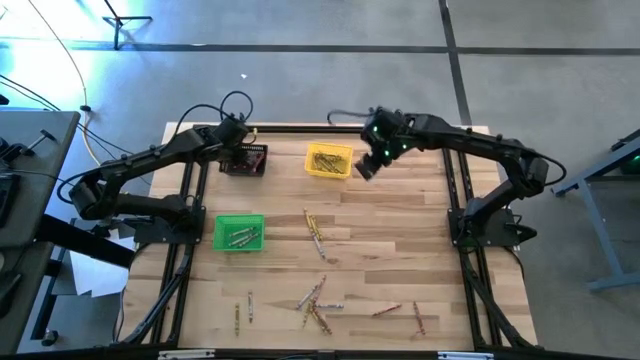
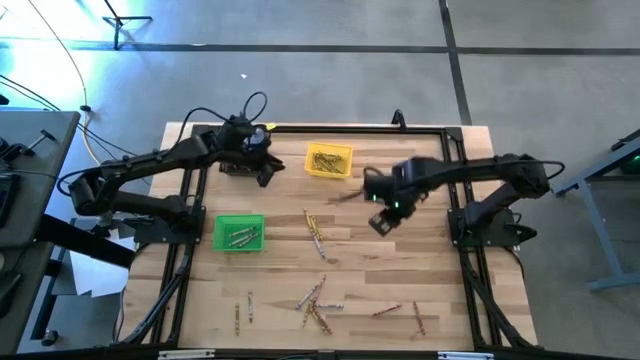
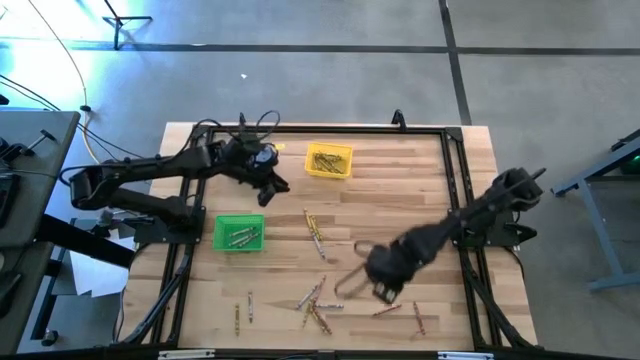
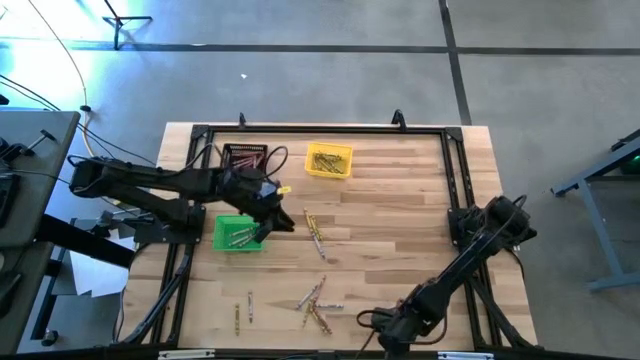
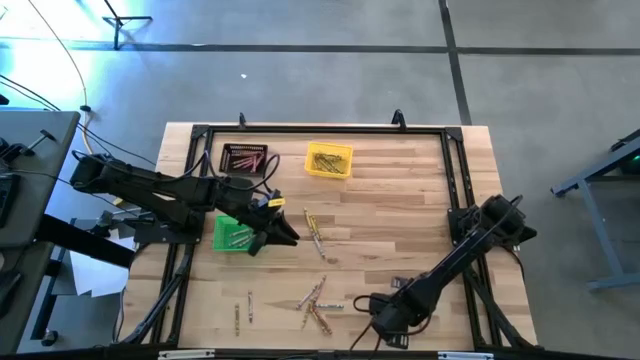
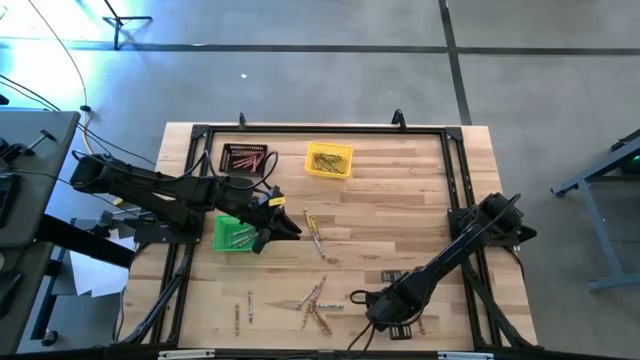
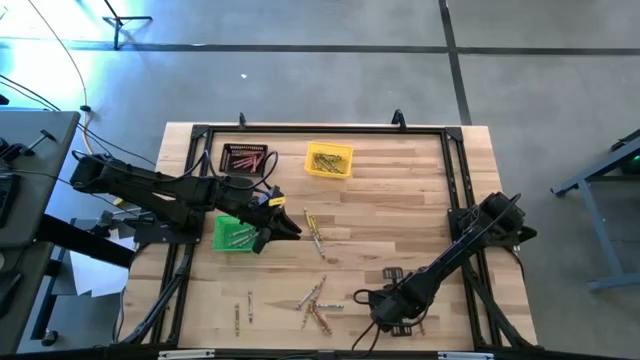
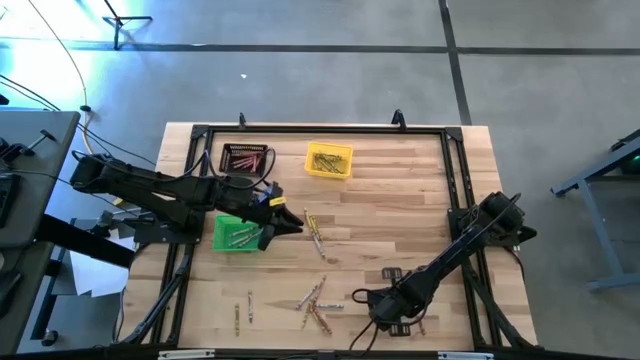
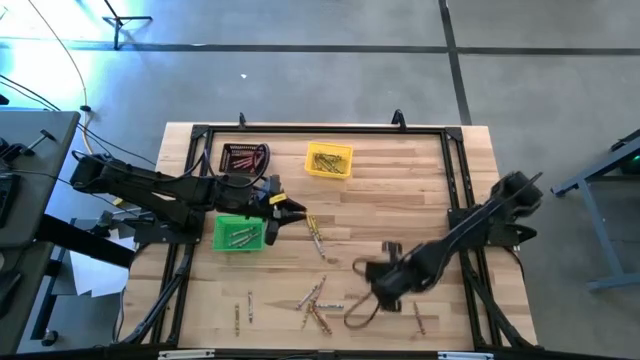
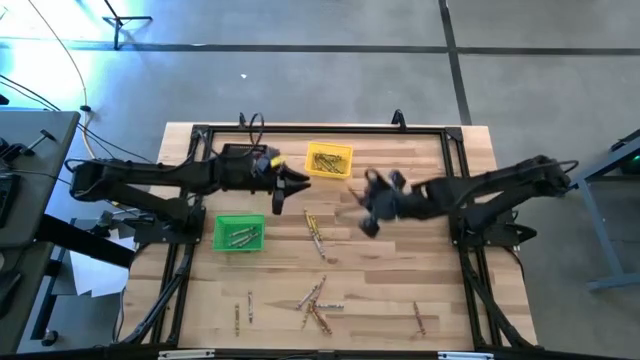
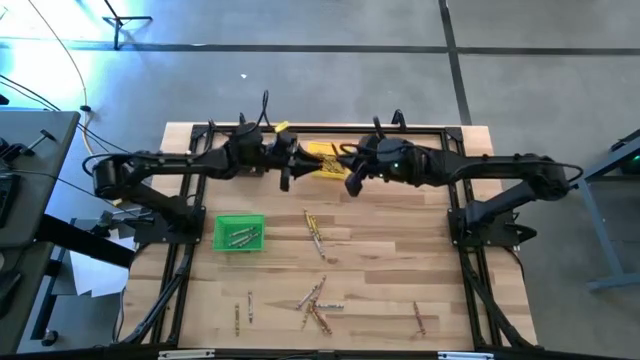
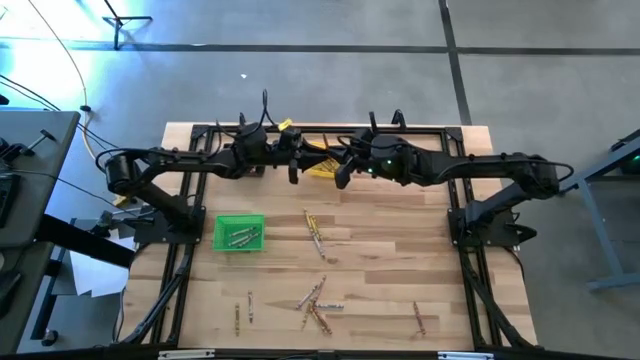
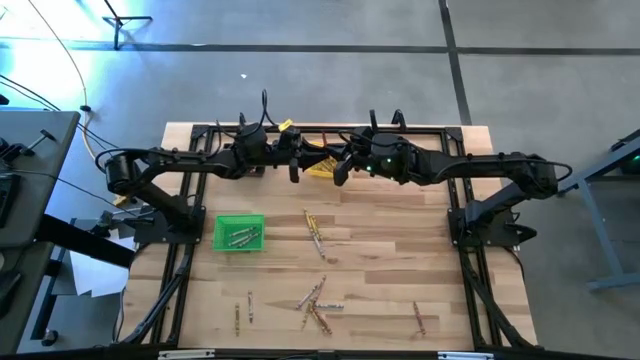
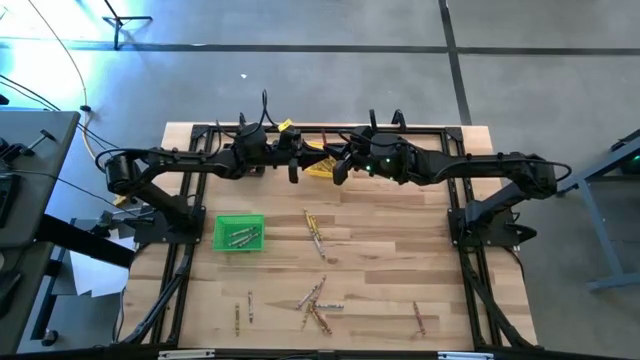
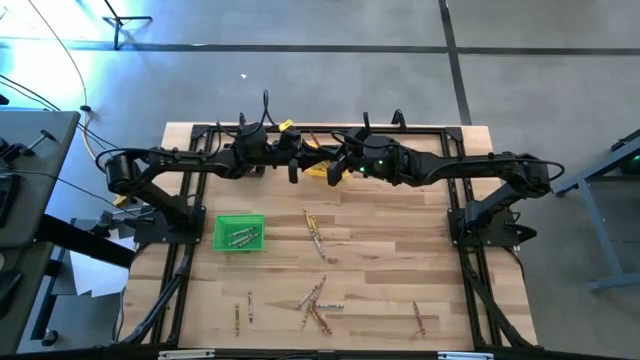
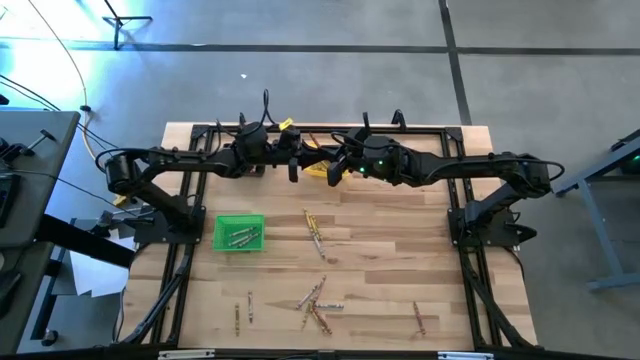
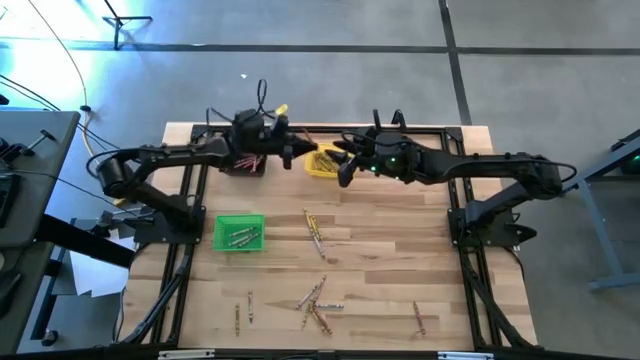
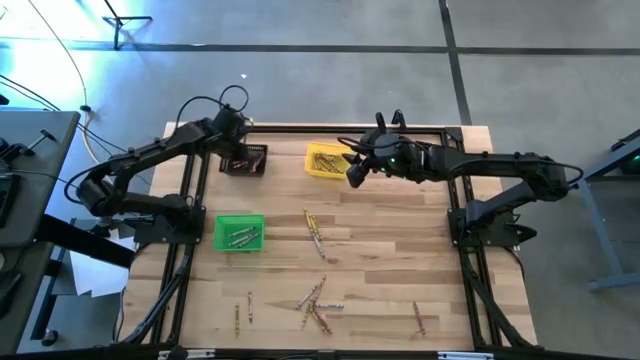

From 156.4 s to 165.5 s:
Task: Sort crayons
Put the red crayon into the black bin

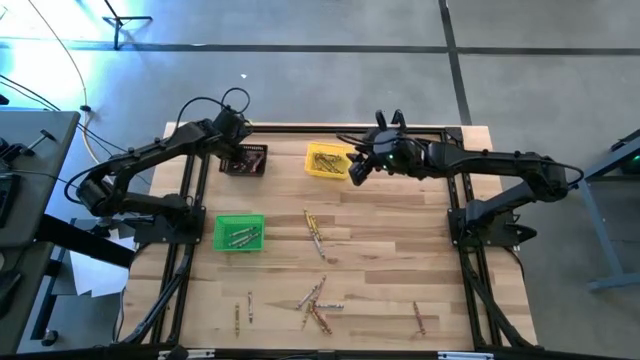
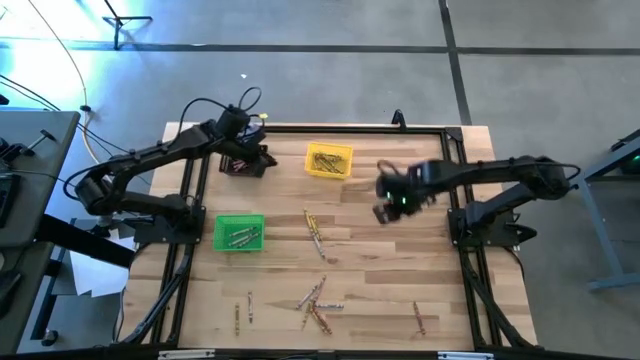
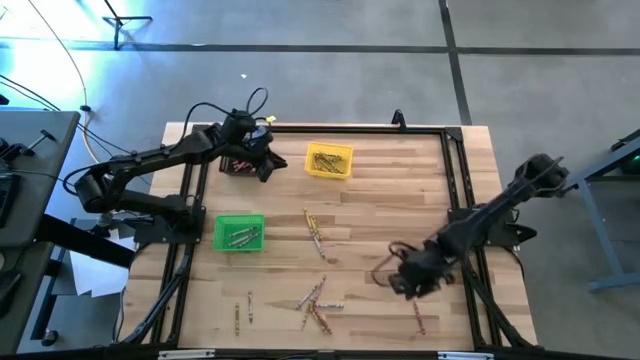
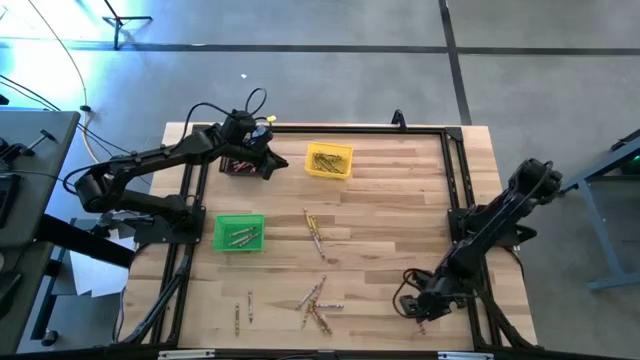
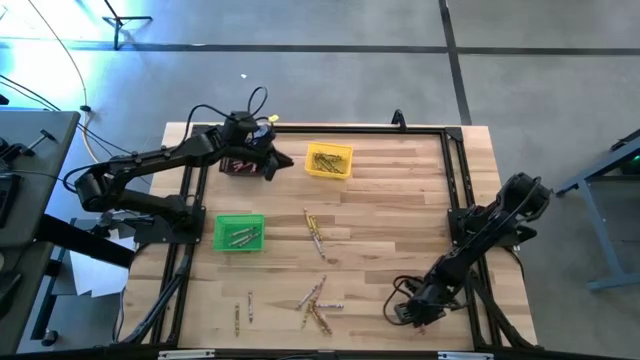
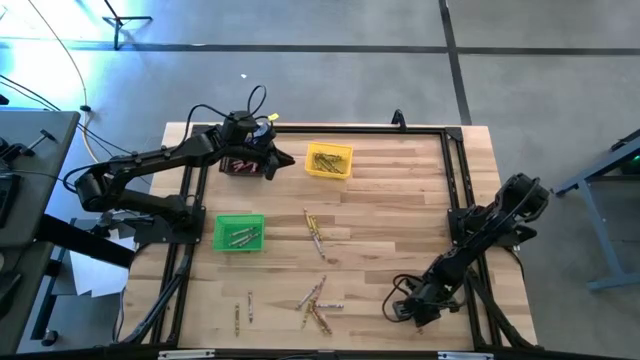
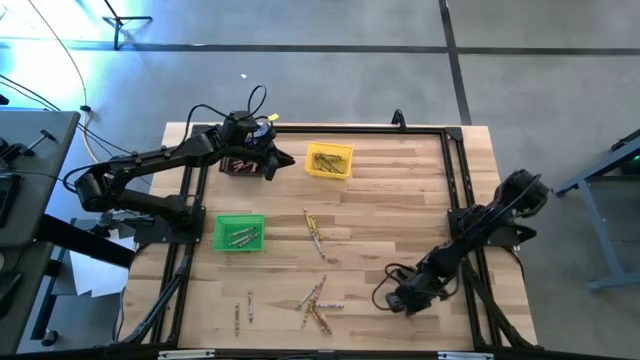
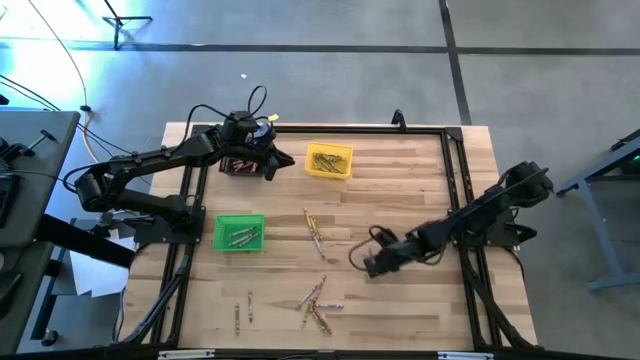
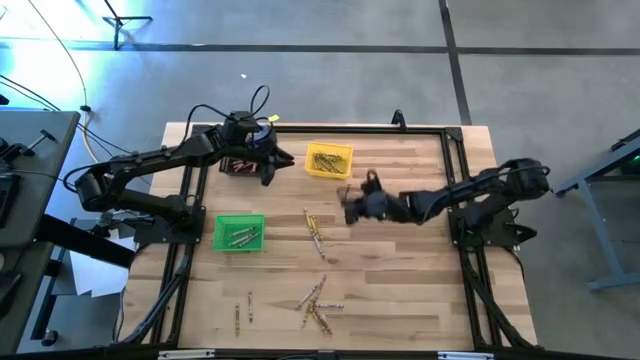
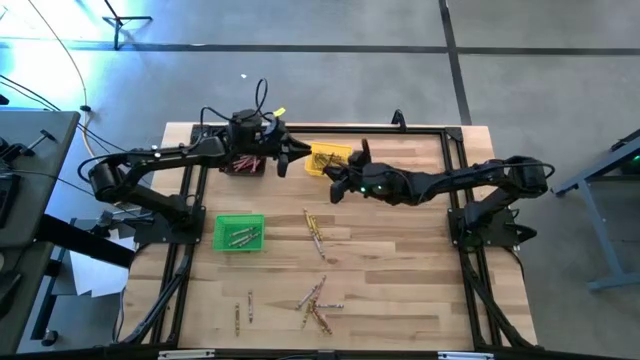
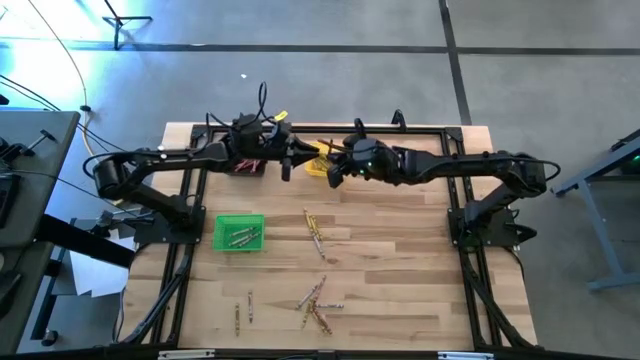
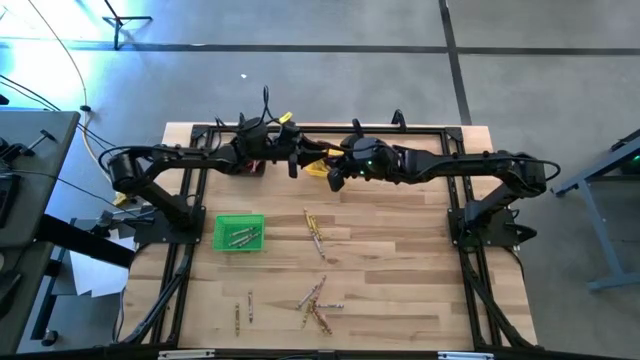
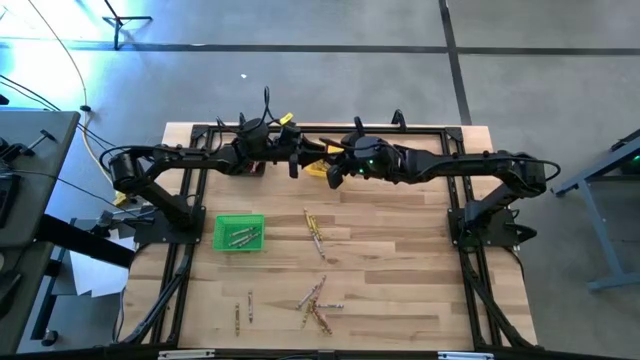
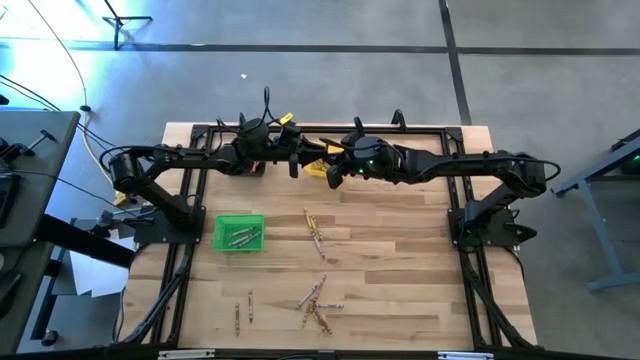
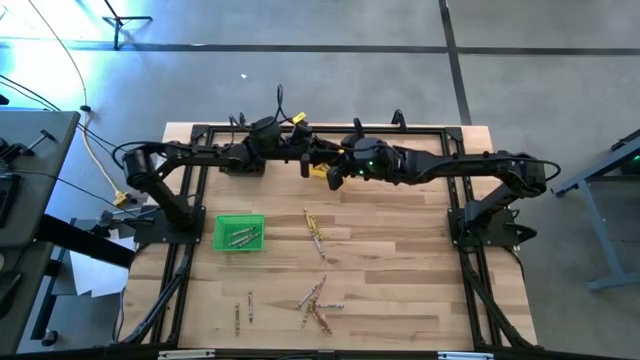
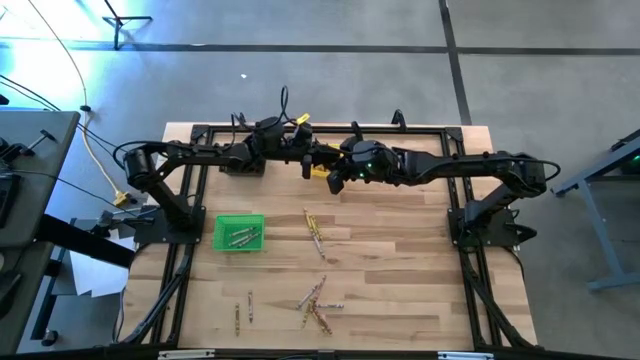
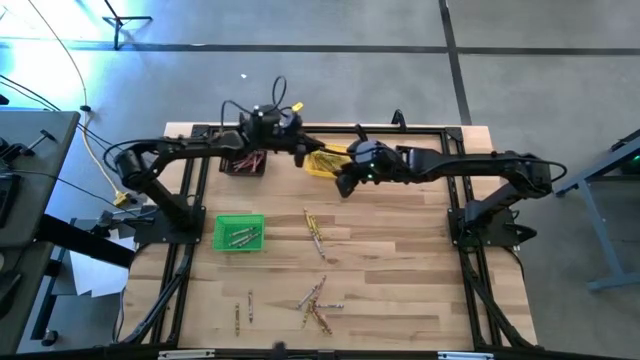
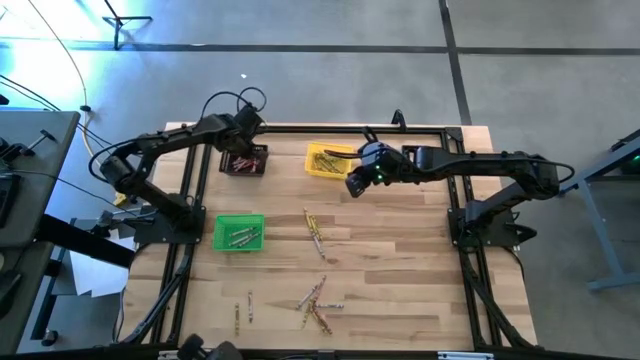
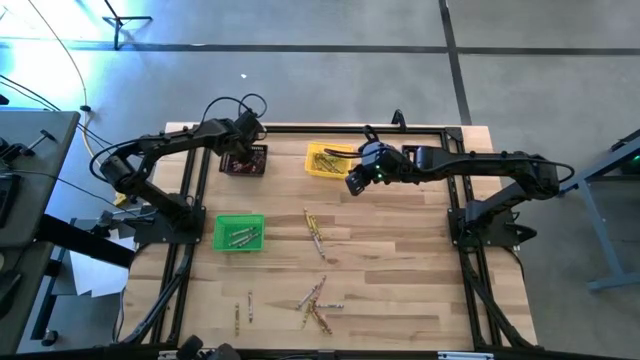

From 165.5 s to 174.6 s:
Put the red crayon into the black bin

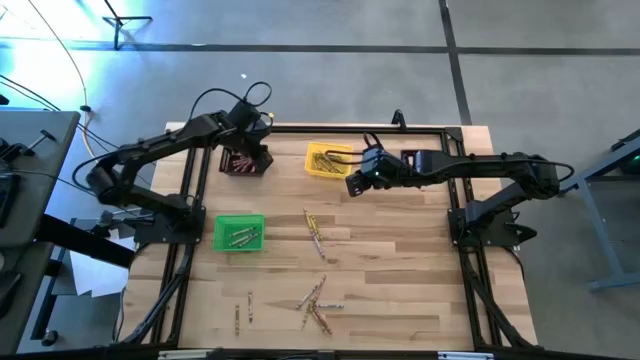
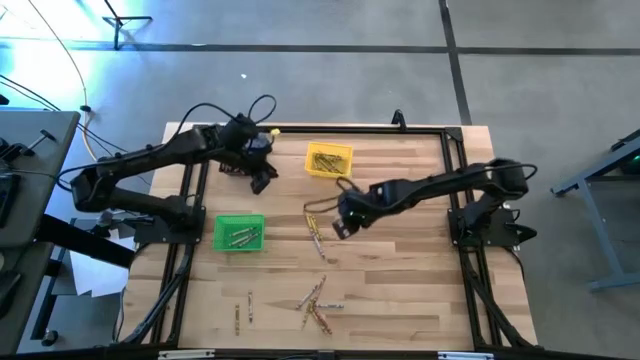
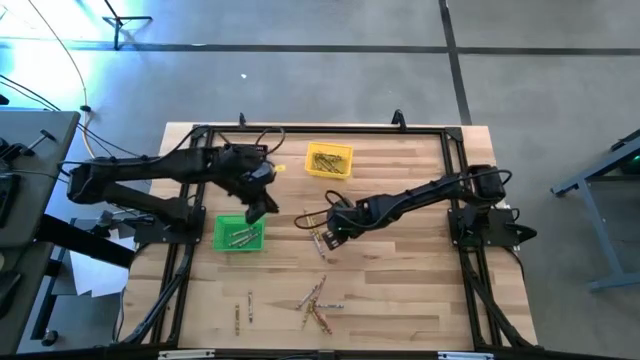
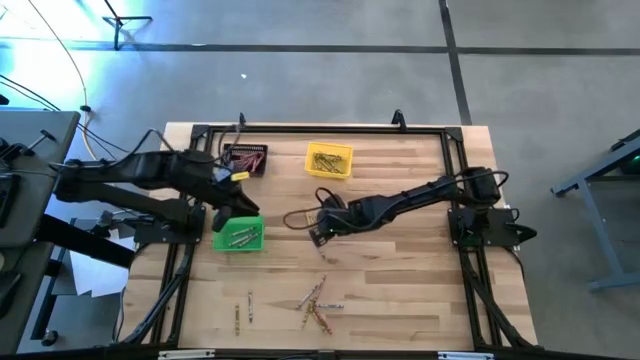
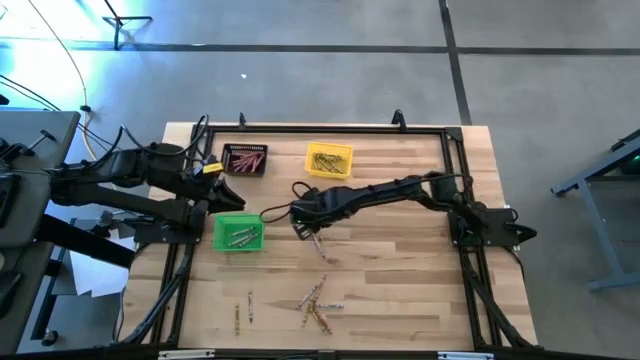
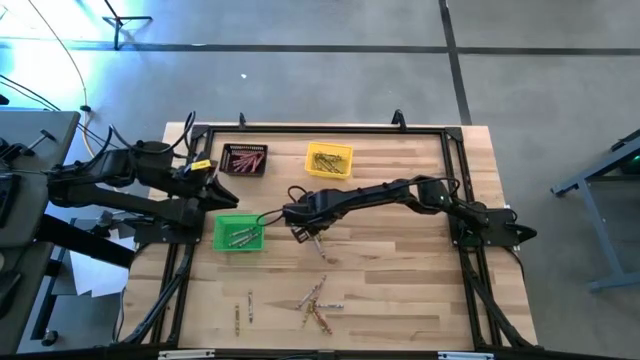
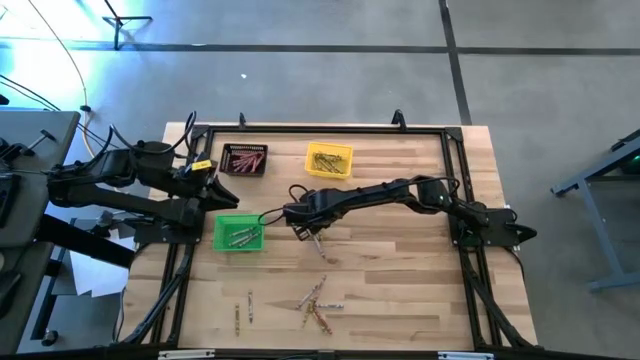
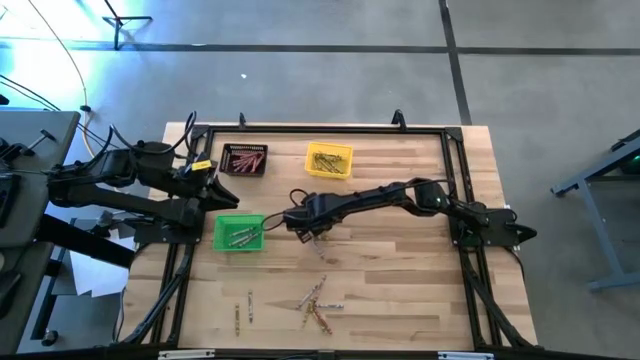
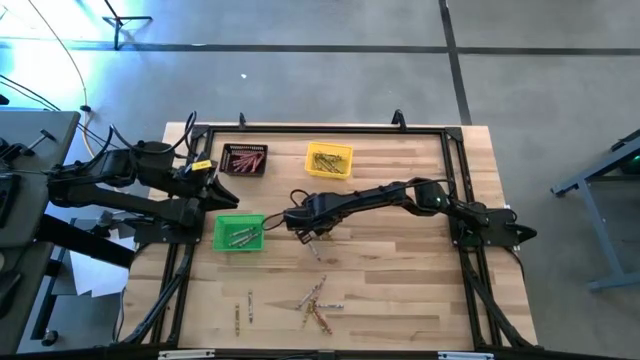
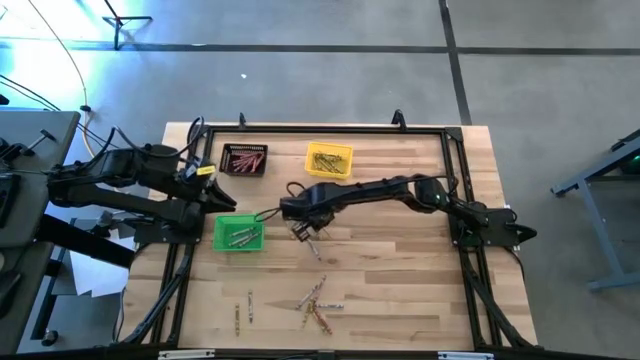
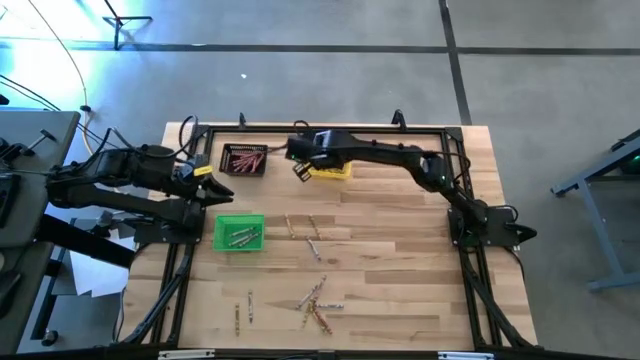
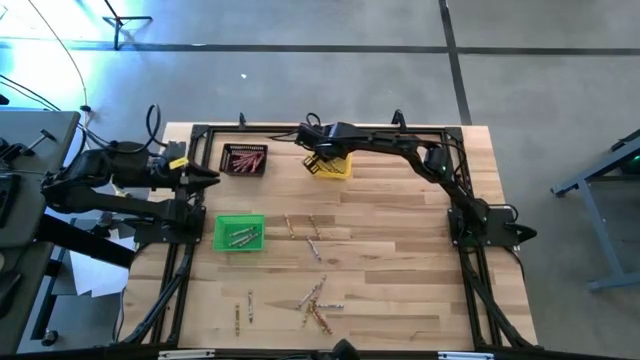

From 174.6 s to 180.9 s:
Put the yellow crayon into the yellow bin
